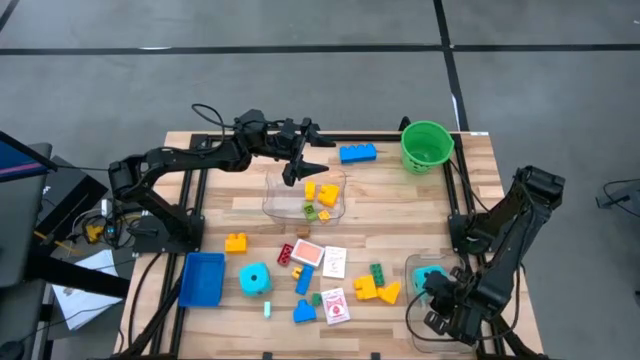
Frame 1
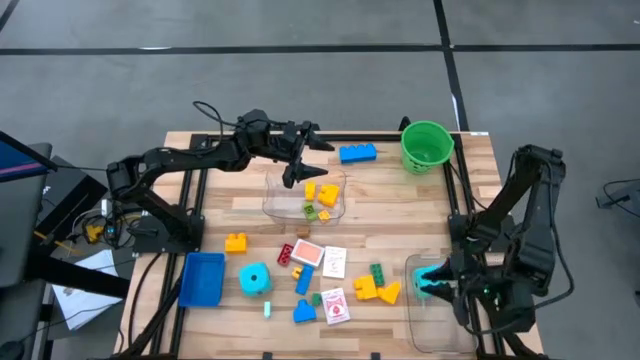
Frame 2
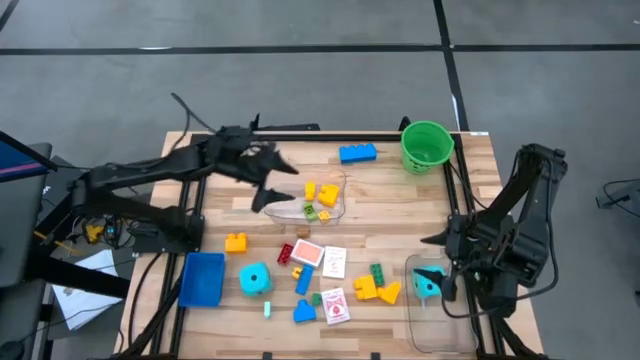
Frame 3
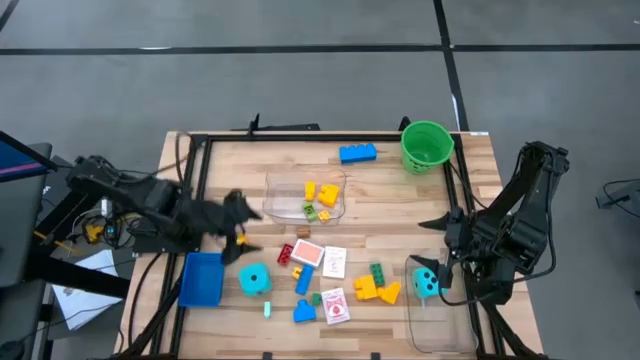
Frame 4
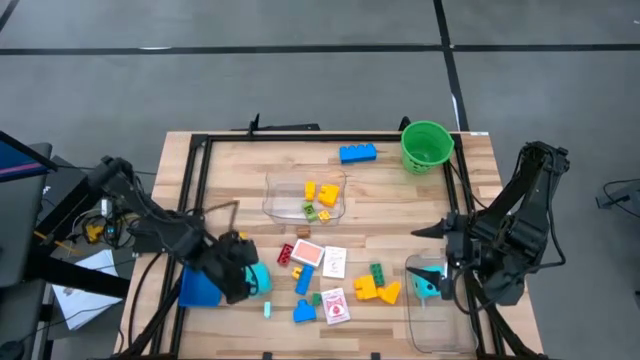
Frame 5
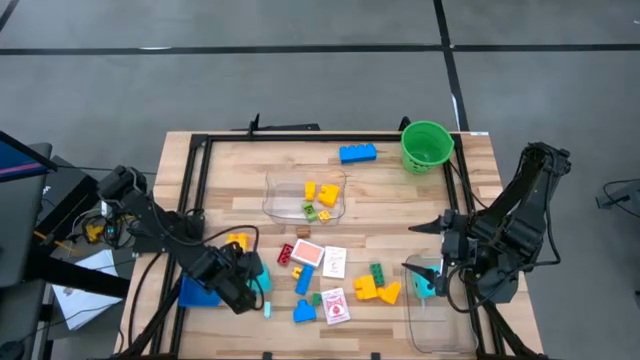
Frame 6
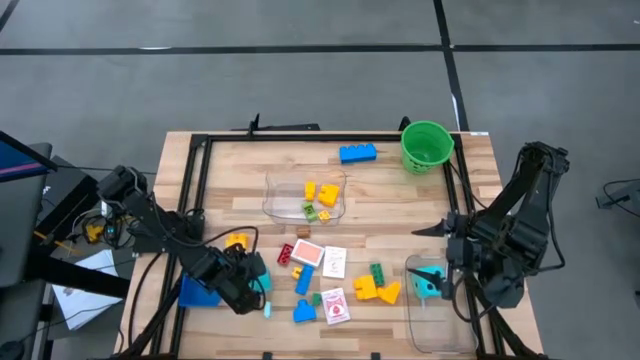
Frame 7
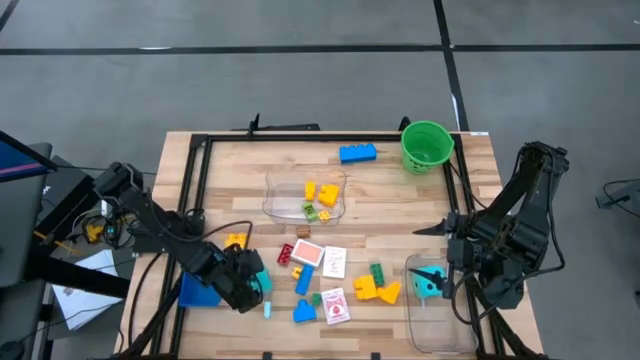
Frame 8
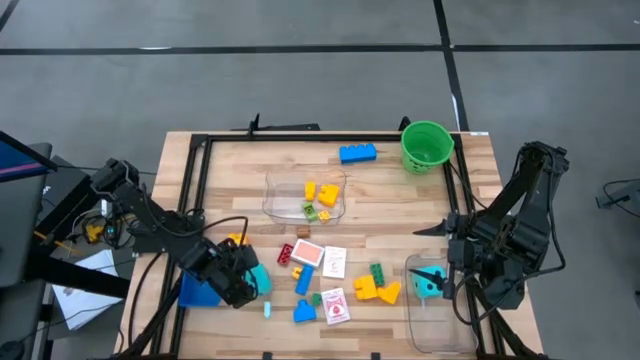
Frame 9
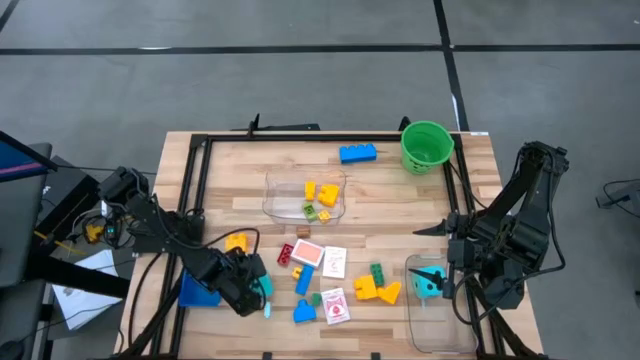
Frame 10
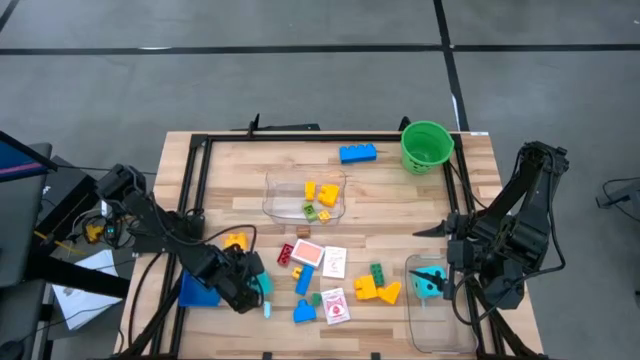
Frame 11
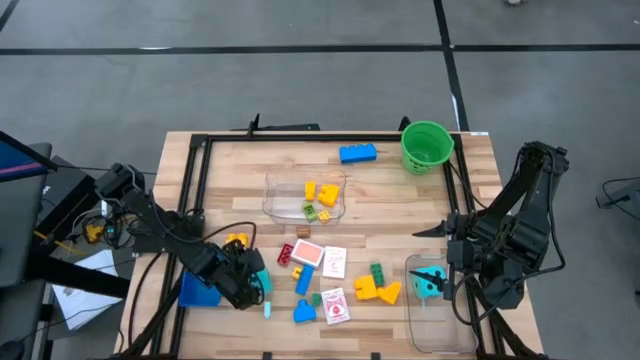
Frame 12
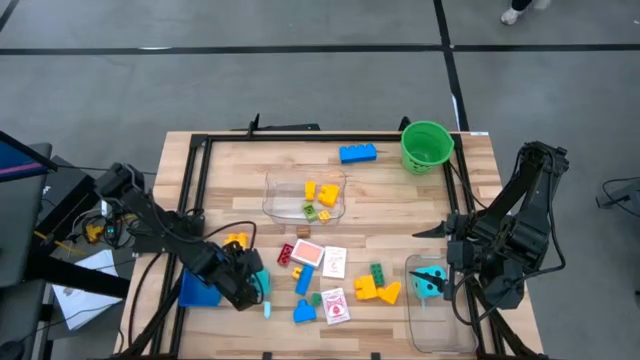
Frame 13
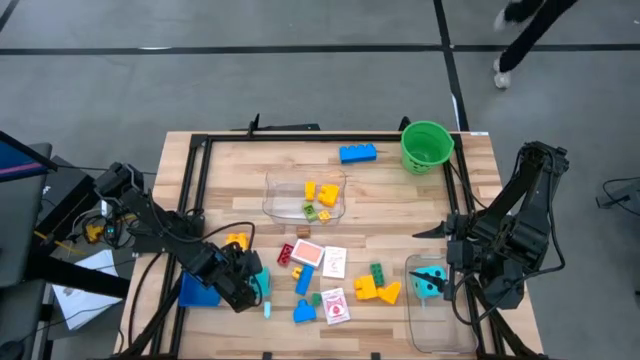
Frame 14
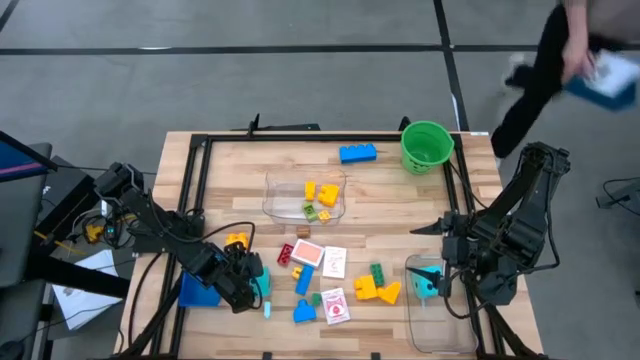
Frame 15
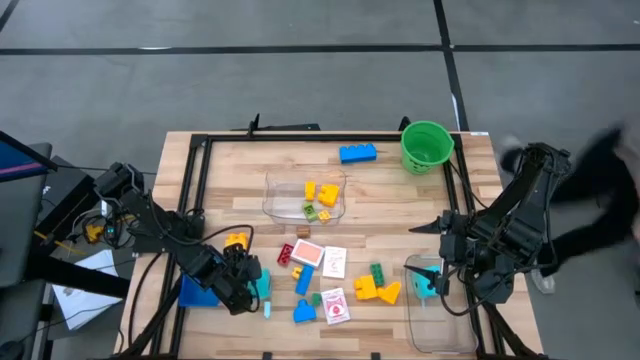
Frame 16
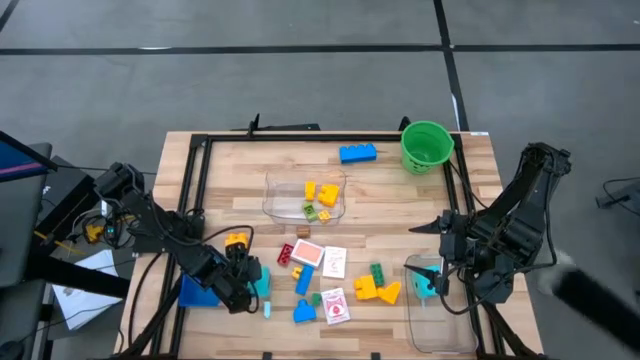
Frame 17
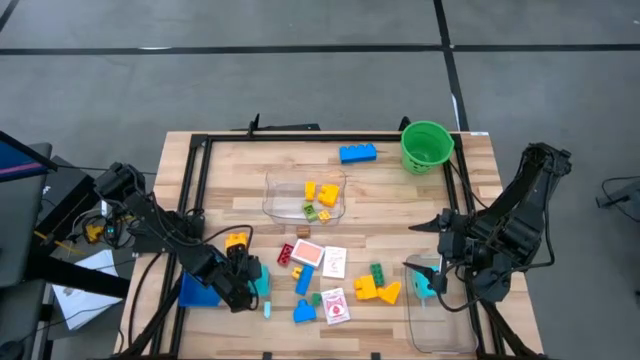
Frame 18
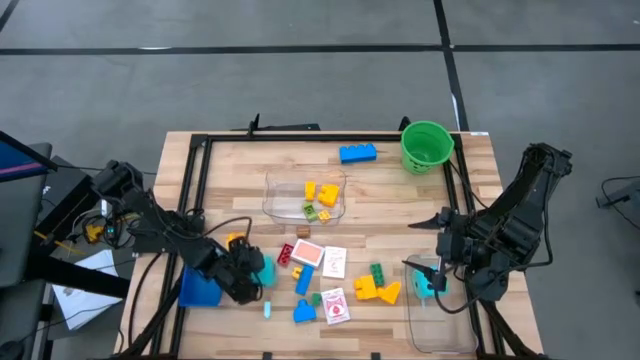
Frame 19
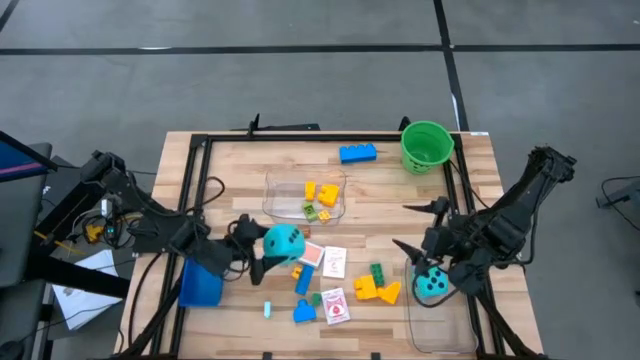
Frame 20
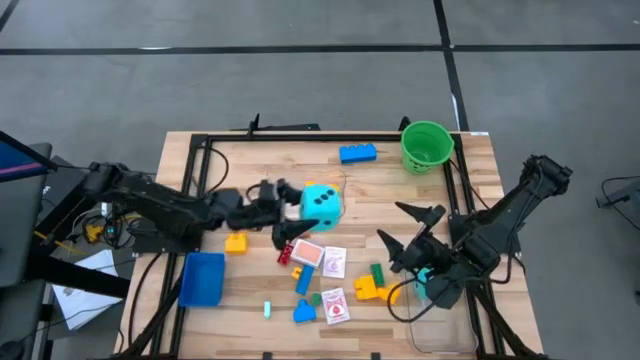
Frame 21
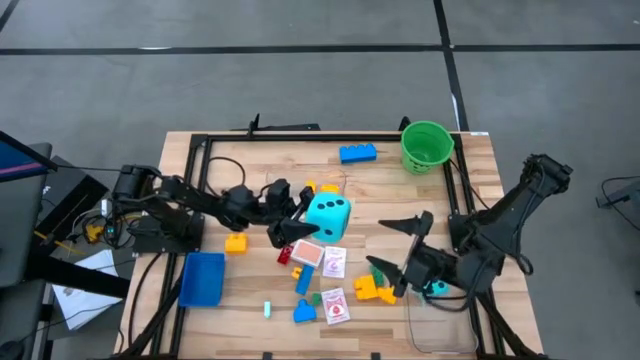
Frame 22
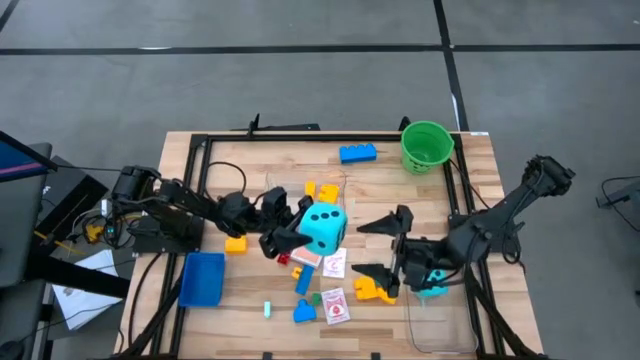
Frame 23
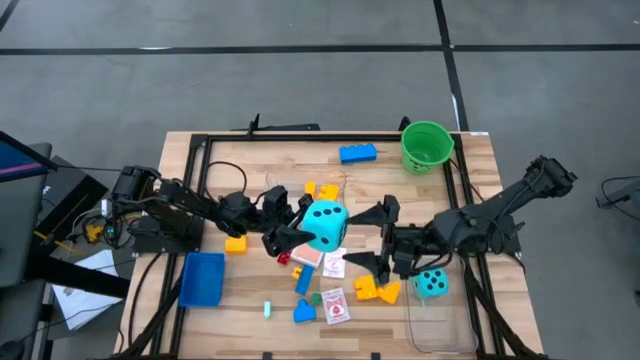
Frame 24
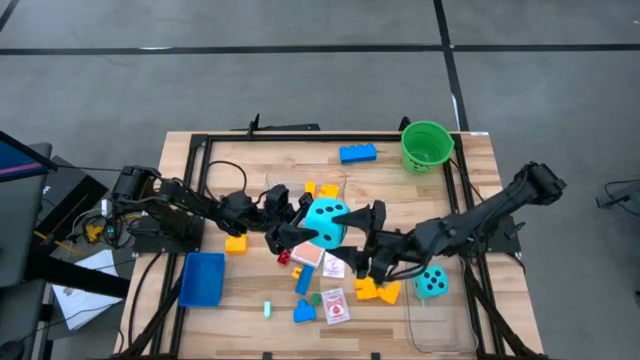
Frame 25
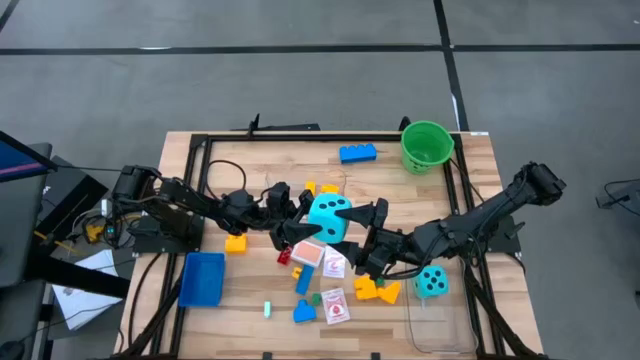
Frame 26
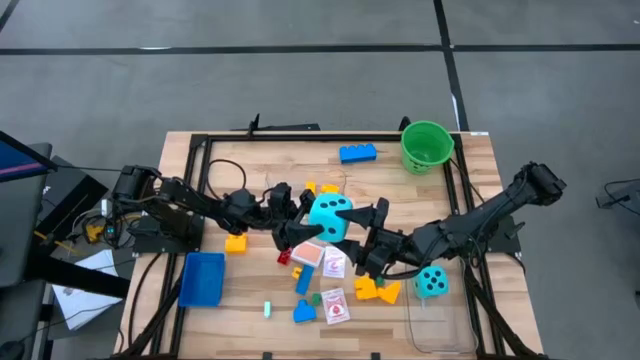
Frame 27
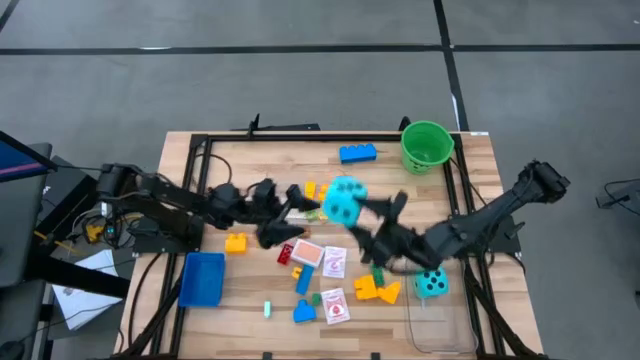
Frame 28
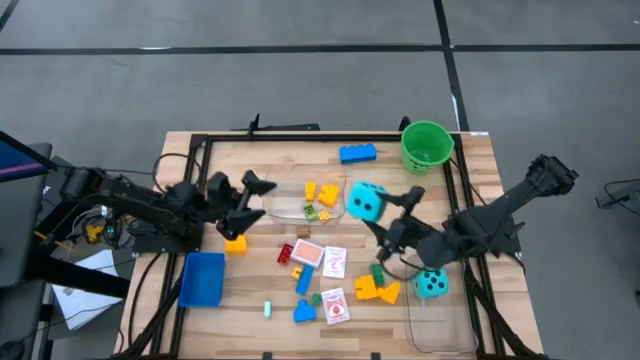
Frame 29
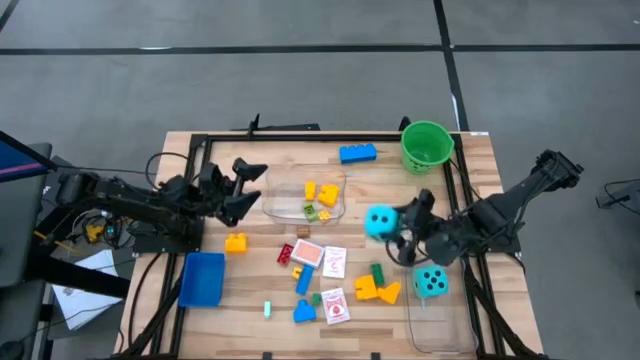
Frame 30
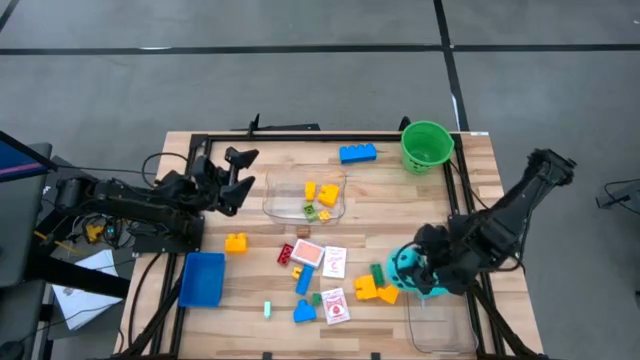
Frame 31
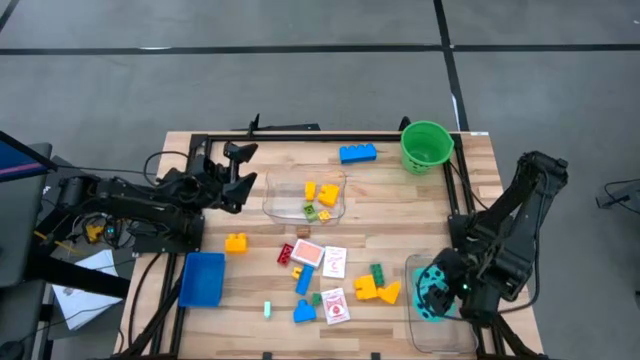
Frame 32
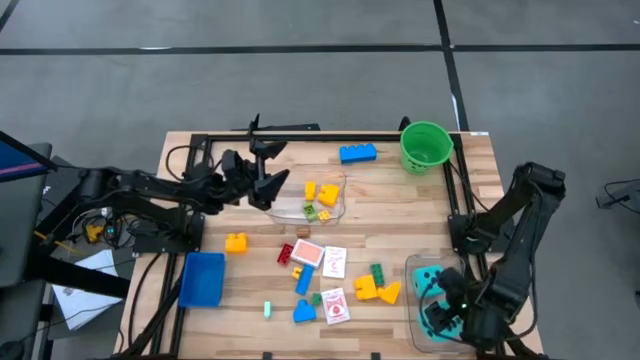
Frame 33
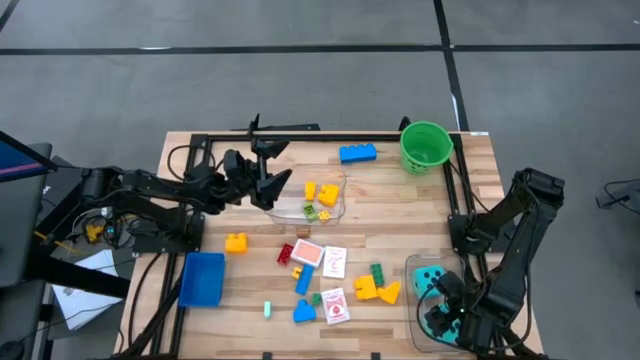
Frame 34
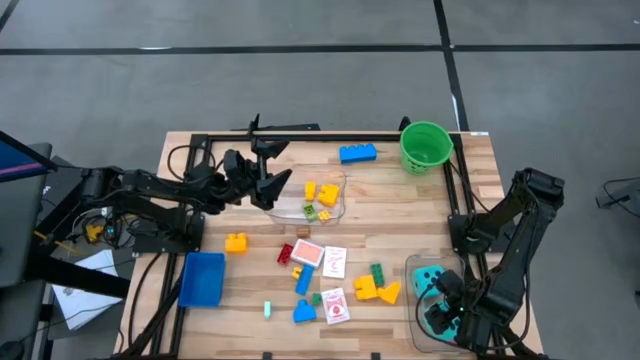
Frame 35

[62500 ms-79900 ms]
Task: Pick & Place Toys
Put the blue die into the bottom transparent bin

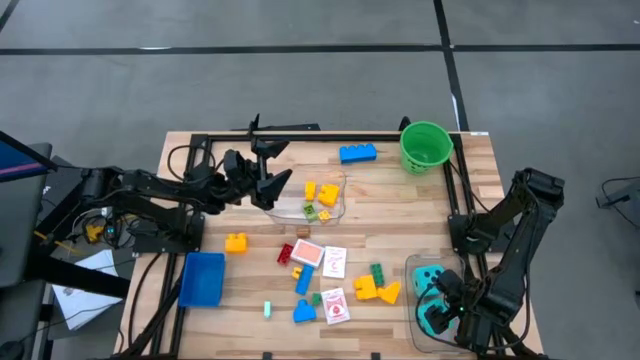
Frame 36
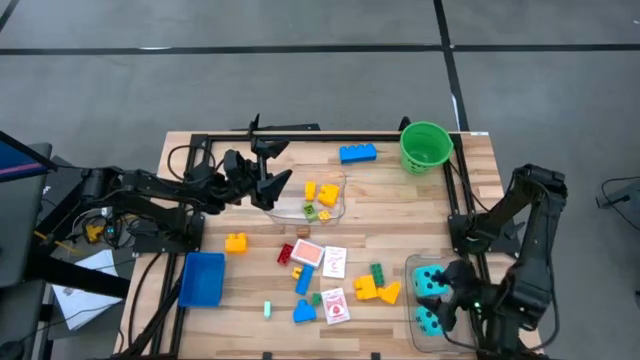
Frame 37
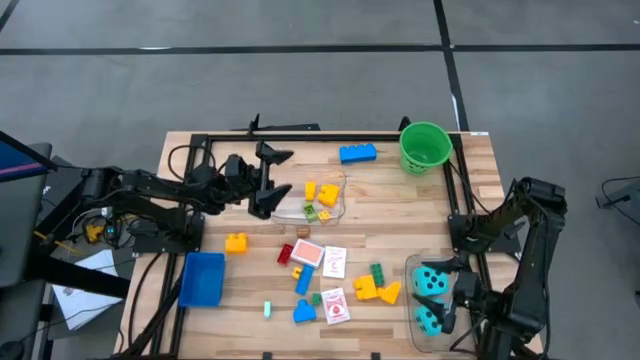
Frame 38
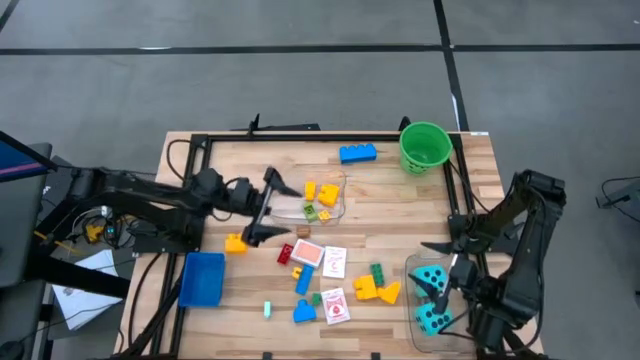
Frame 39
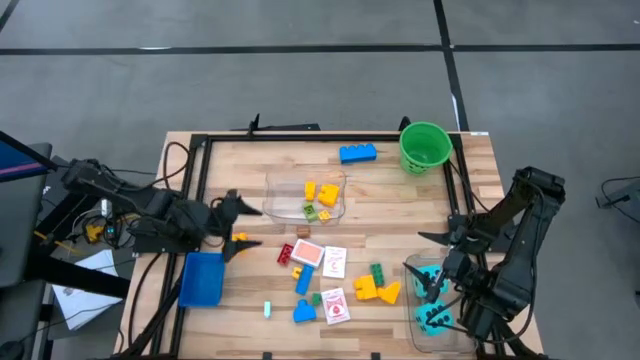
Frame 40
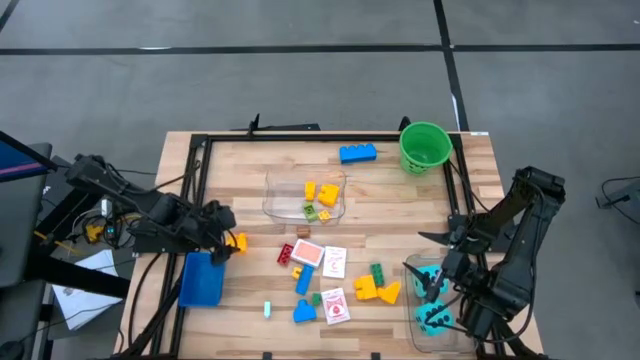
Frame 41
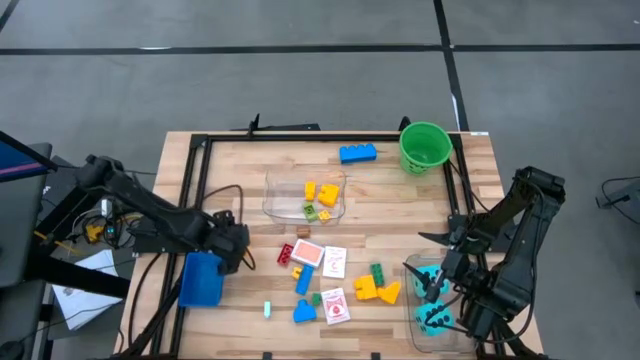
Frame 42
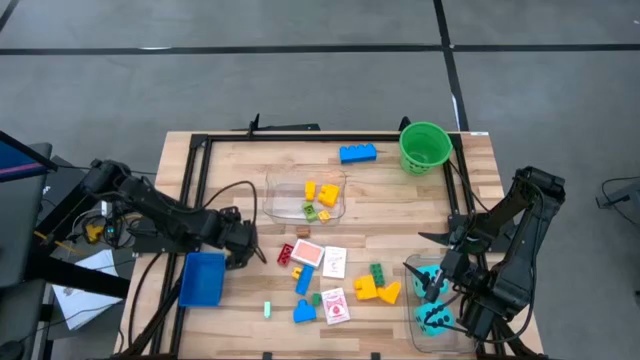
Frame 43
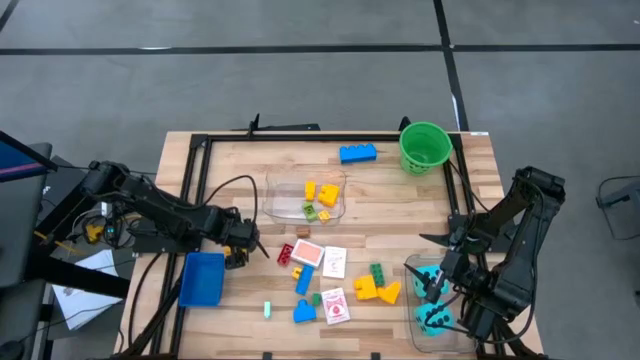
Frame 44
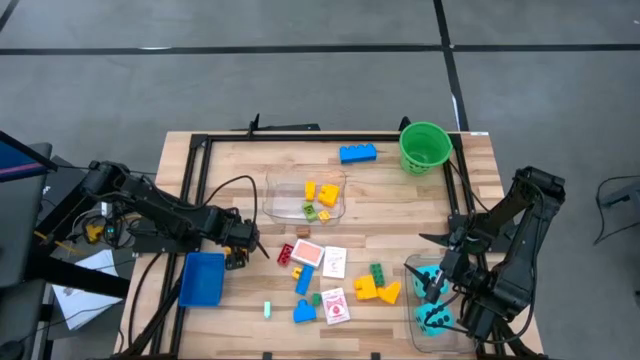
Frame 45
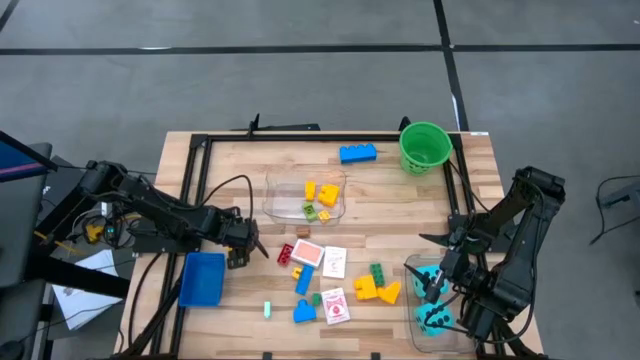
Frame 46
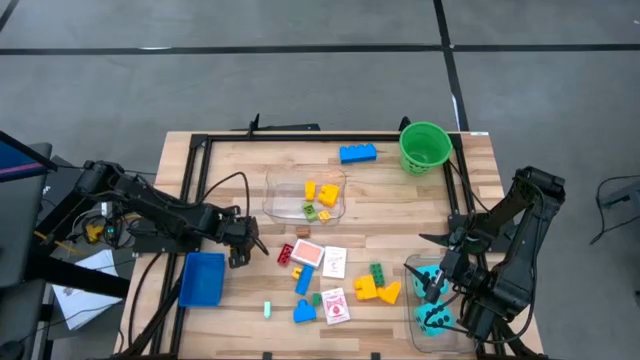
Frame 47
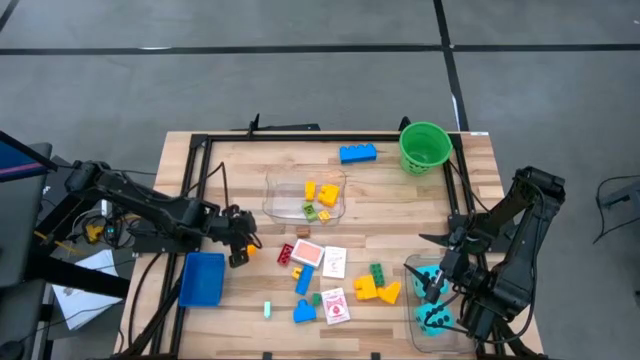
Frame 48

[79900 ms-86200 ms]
Put the yellow game piece into the top transparent bin
